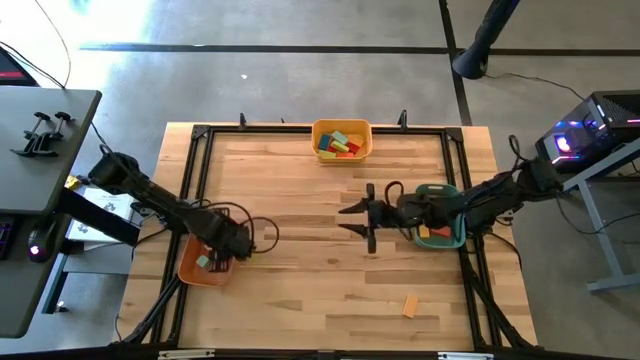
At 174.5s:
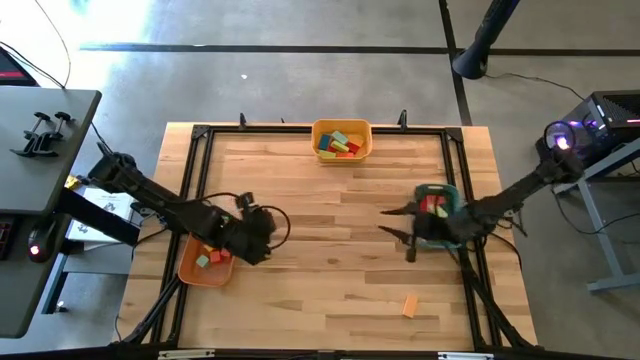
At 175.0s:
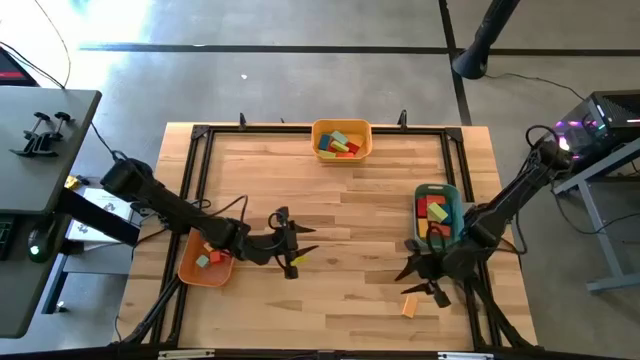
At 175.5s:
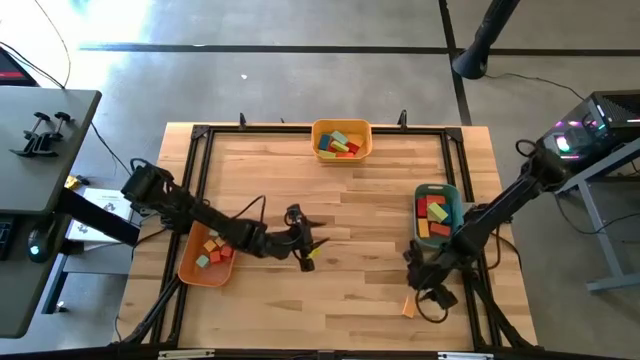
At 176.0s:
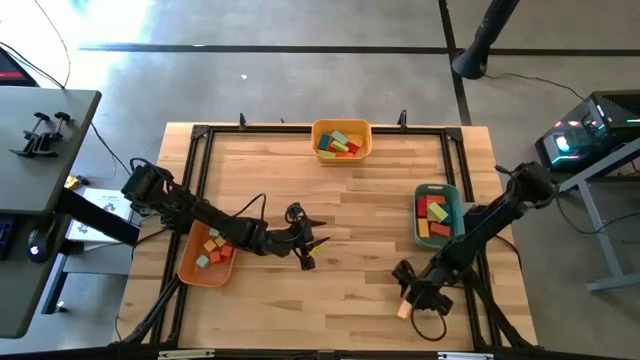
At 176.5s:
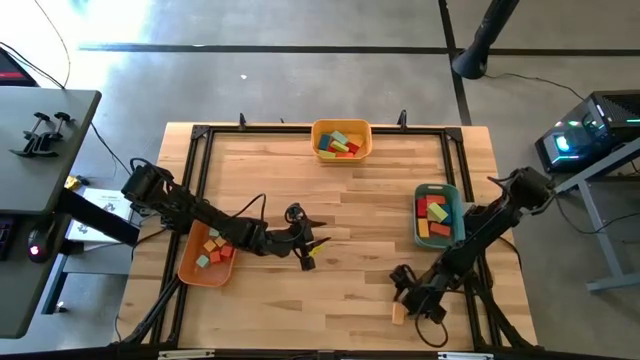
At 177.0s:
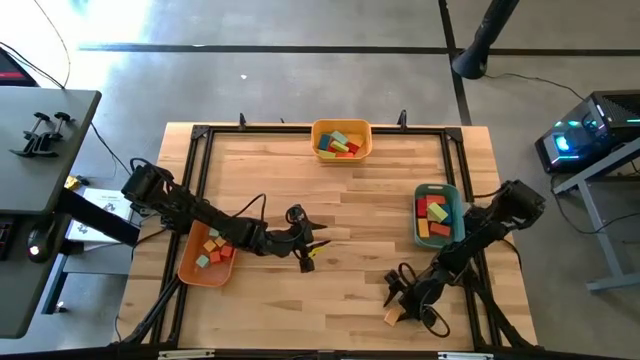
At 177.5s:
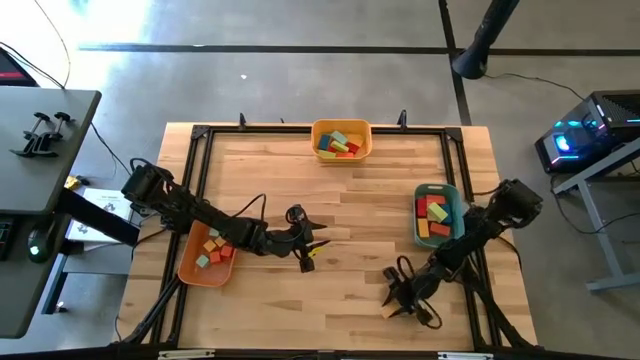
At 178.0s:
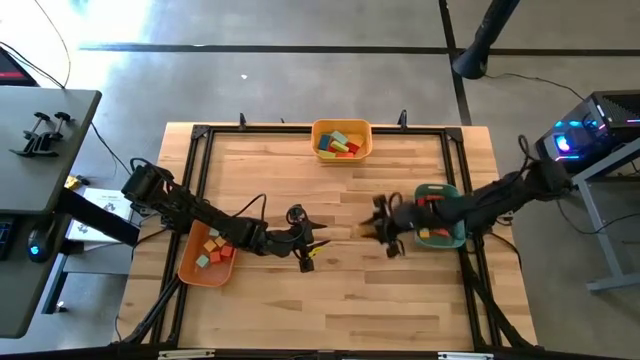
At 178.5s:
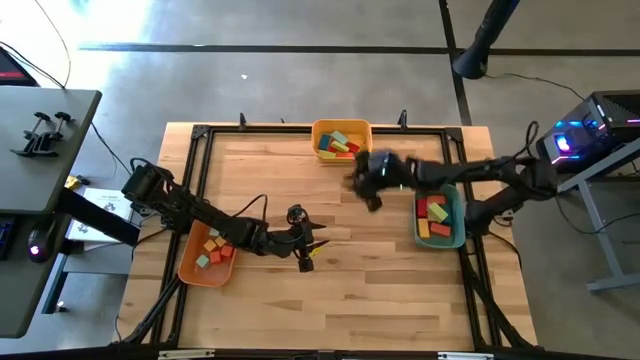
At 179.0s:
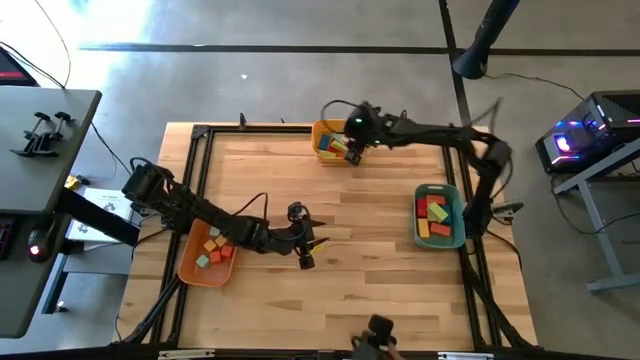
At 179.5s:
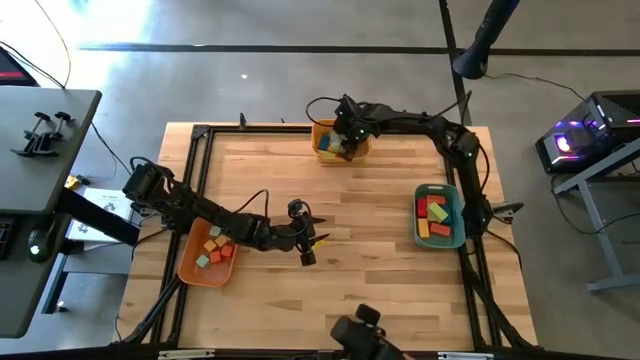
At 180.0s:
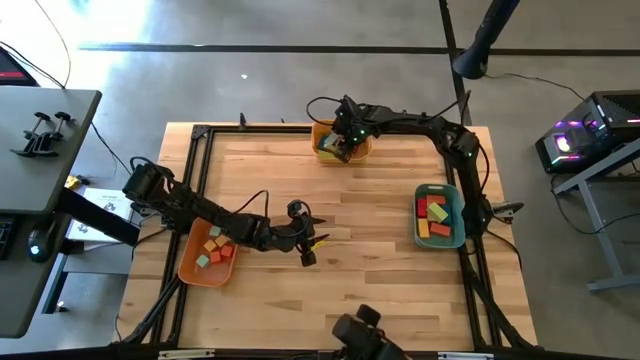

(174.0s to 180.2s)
Task: Sort blocks by size
Put the yellow thin rectangular block into the yellow bin

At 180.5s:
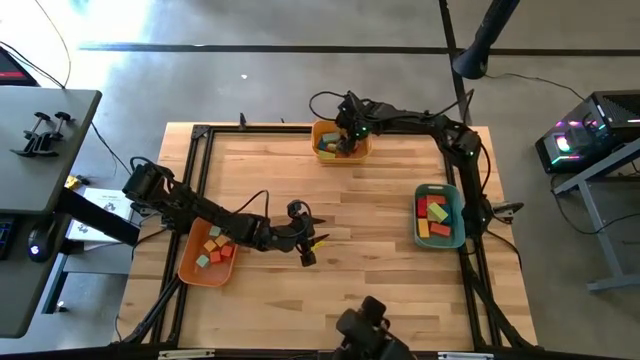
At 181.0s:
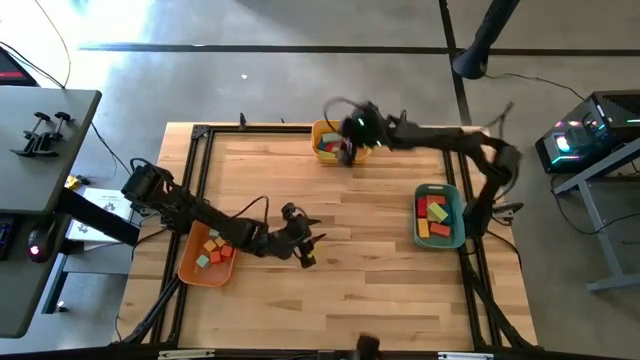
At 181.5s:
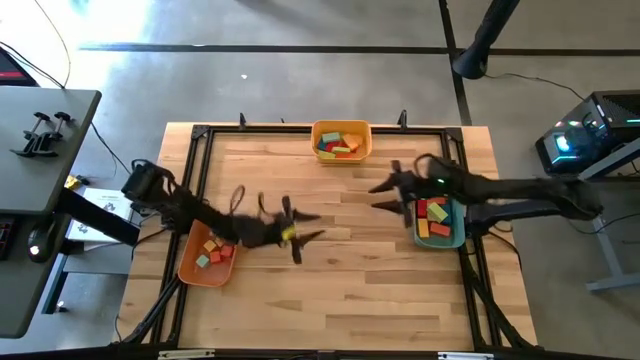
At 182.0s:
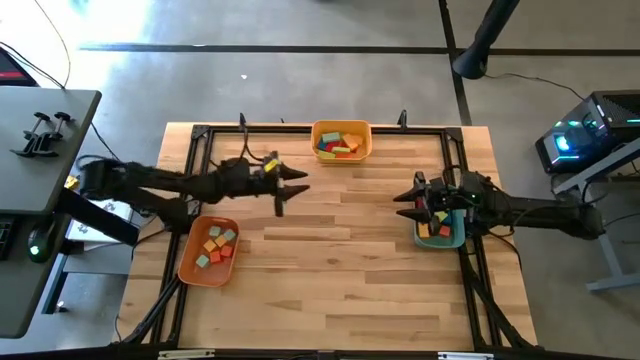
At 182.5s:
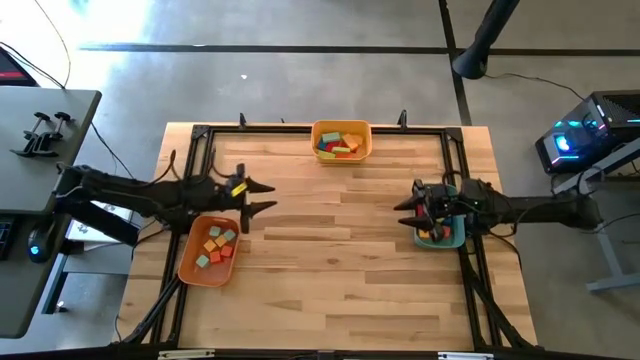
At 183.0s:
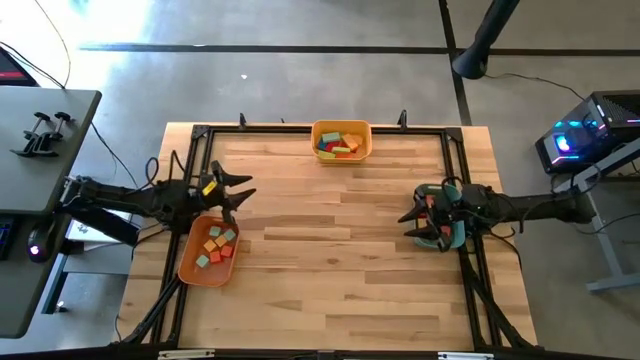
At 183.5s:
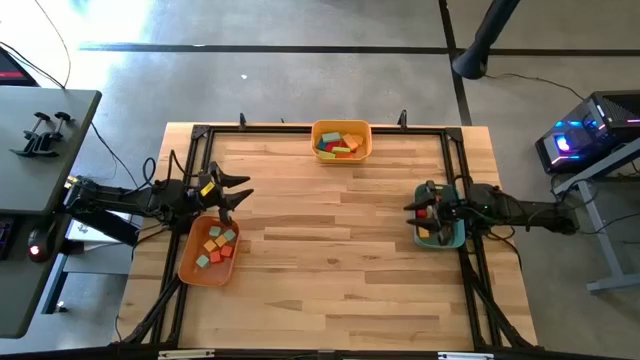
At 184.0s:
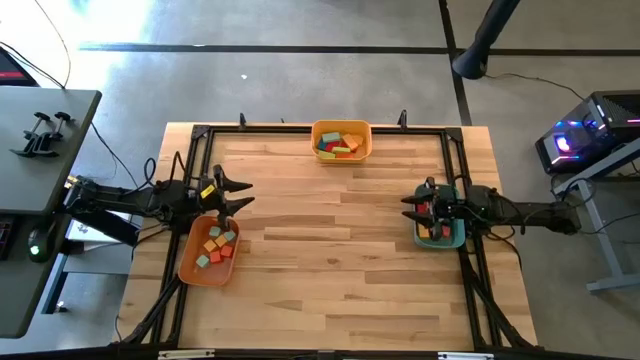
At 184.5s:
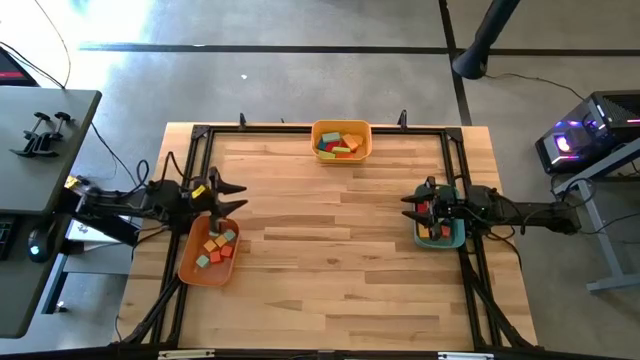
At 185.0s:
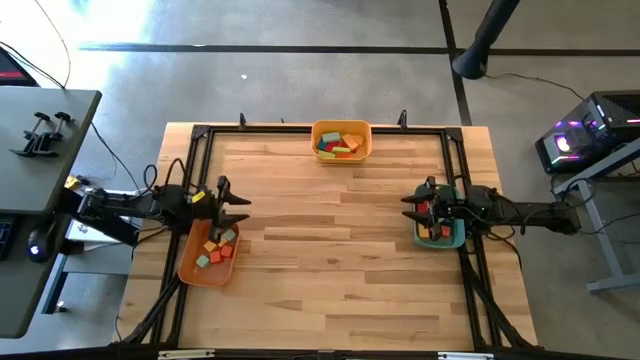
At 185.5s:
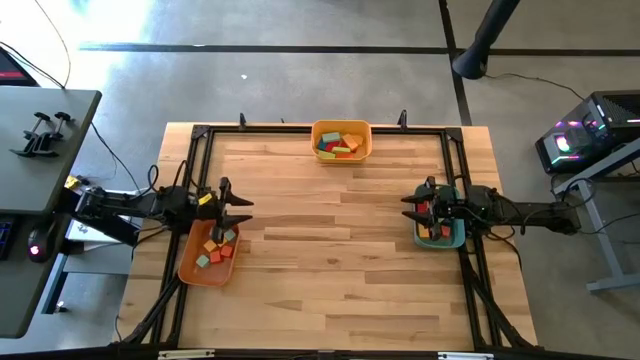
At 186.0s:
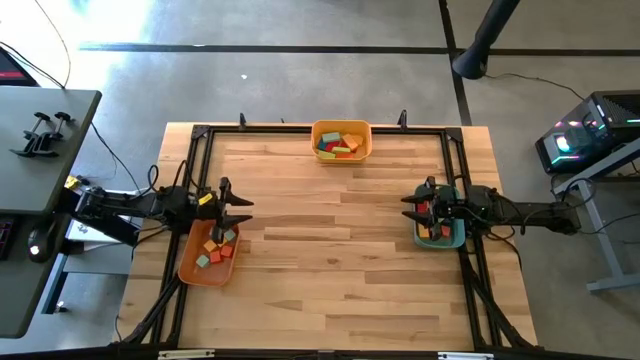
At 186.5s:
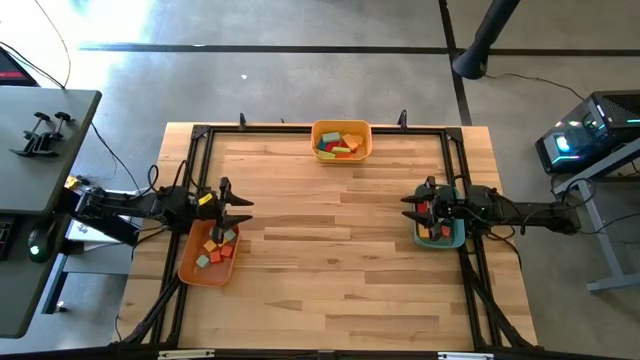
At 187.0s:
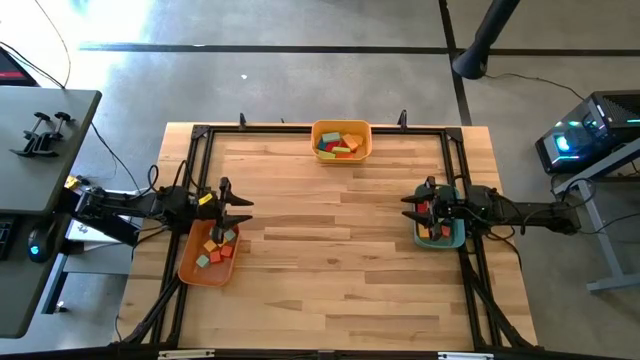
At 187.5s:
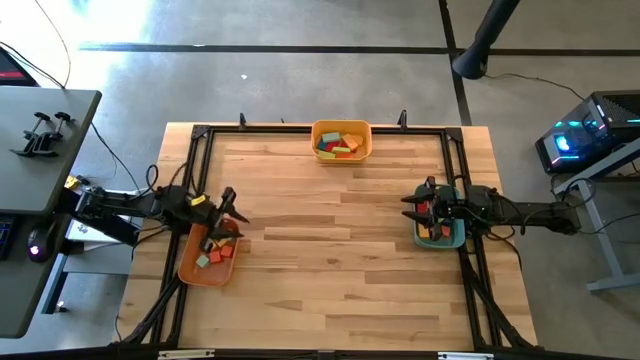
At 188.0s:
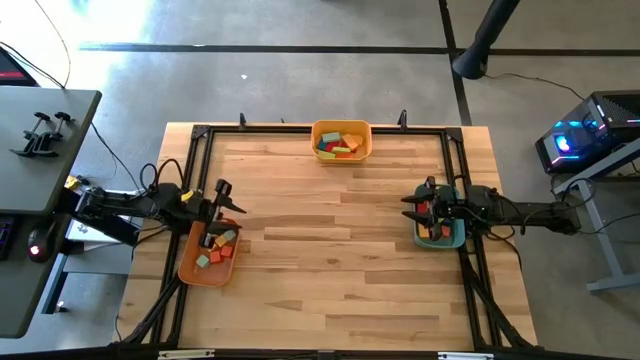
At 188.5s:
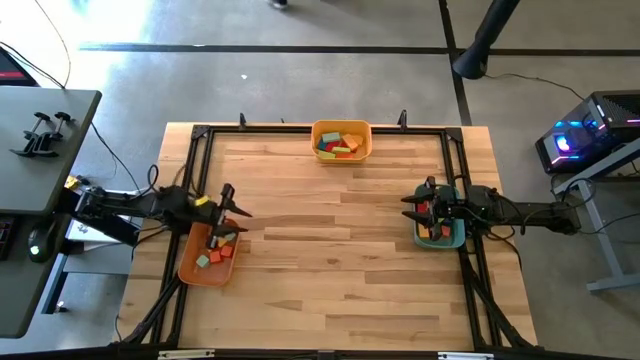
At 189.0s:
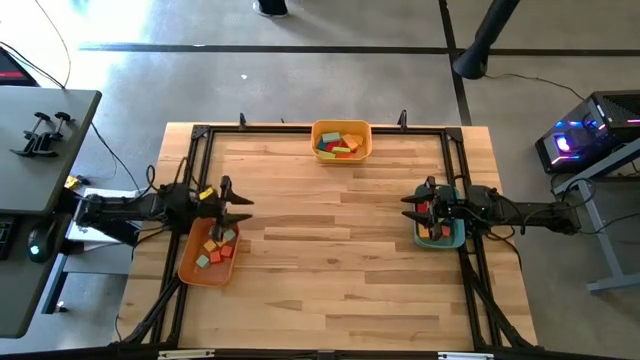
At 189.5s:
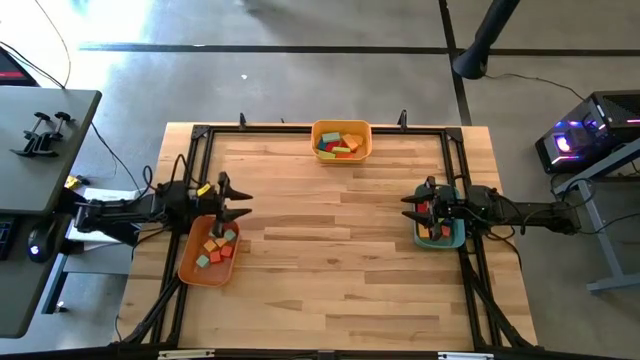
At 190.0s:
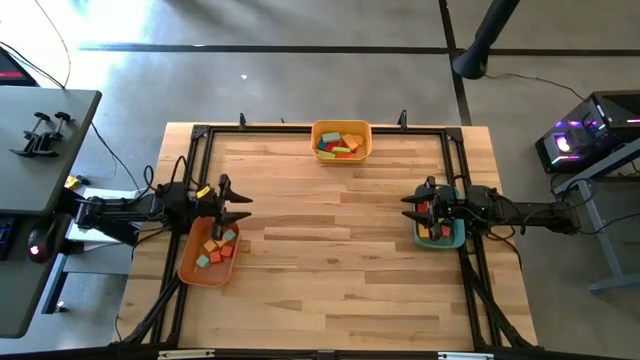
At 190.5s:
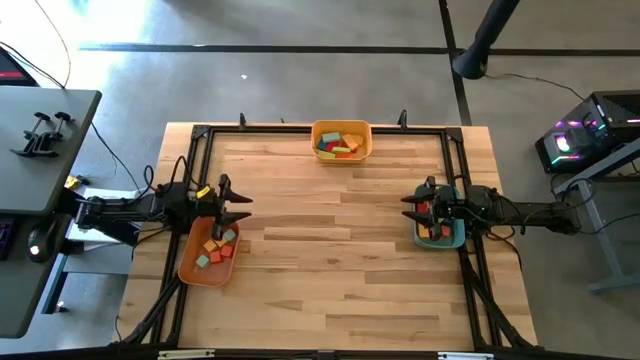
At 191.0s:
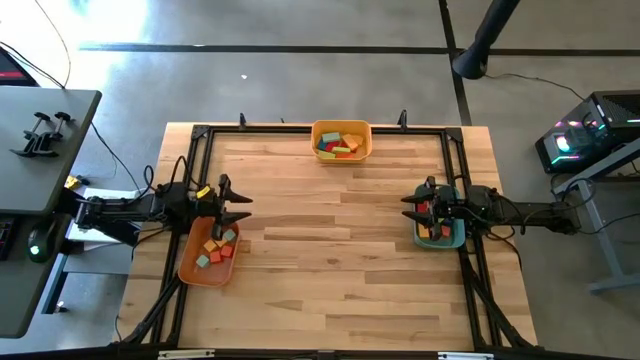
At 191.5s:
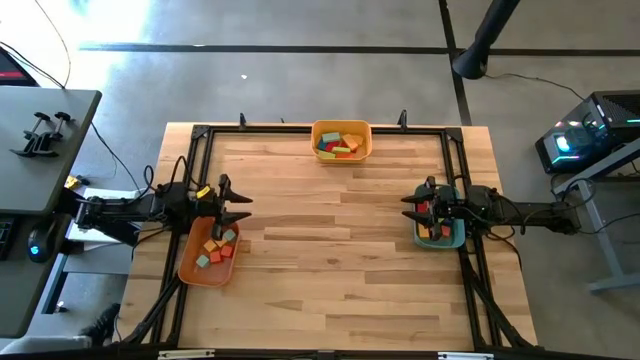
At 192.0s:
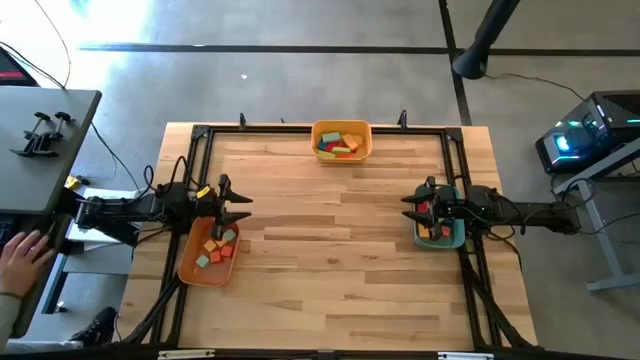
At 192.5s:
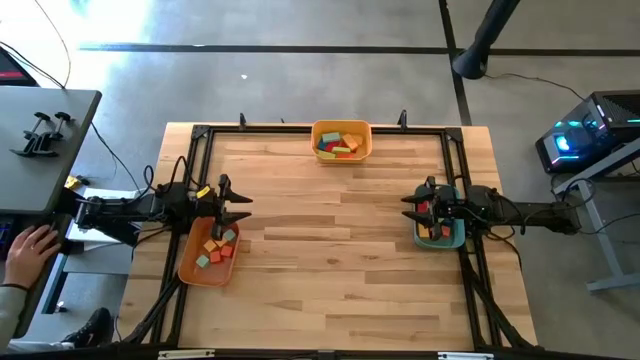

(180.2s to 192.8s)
Return to Home Position

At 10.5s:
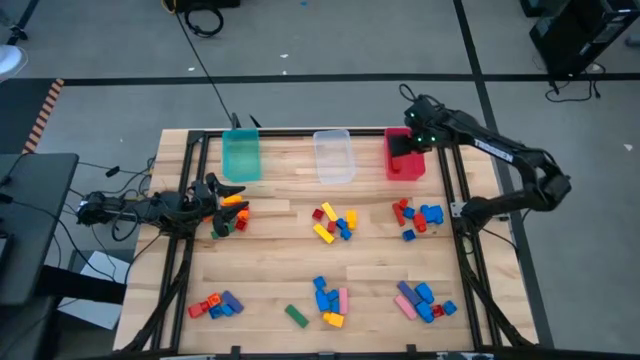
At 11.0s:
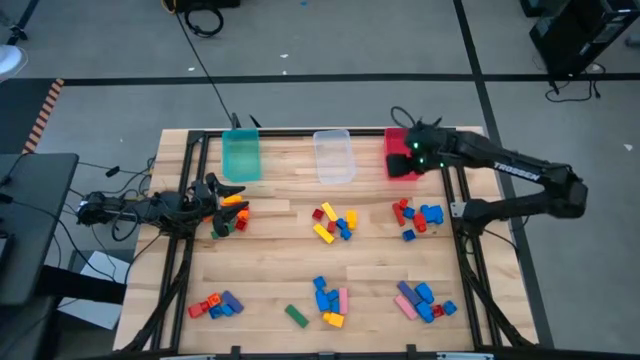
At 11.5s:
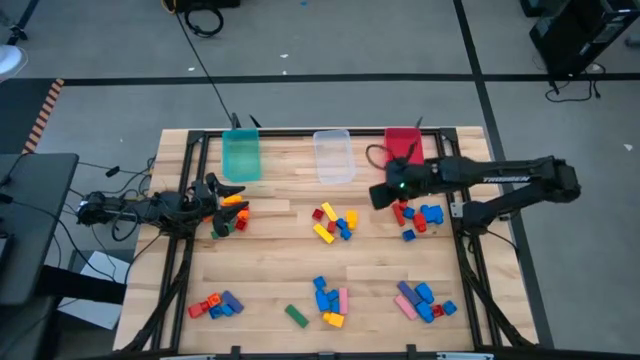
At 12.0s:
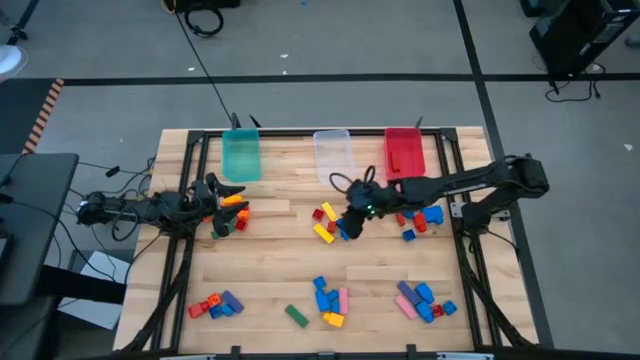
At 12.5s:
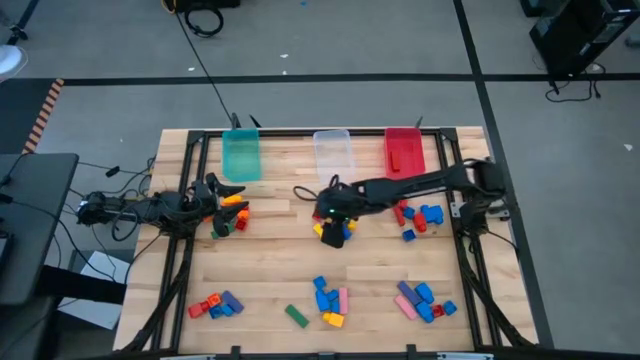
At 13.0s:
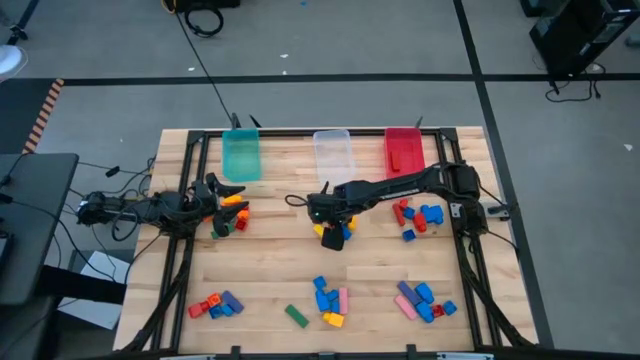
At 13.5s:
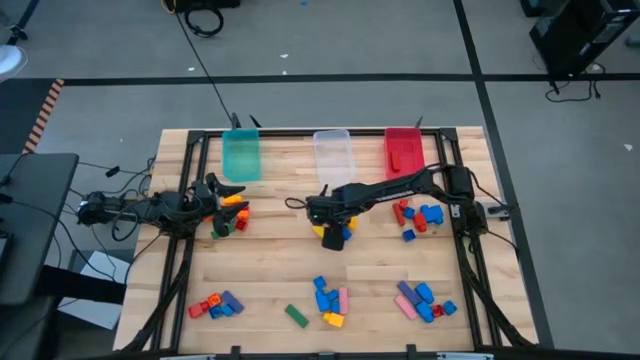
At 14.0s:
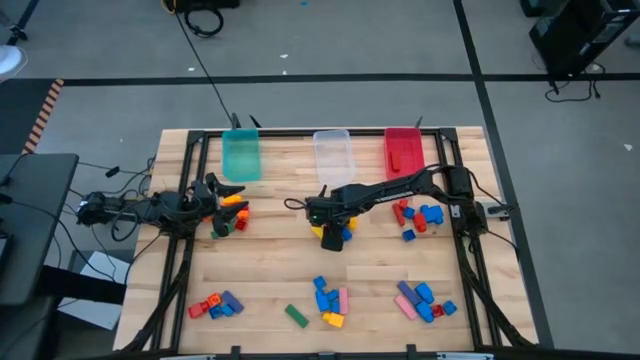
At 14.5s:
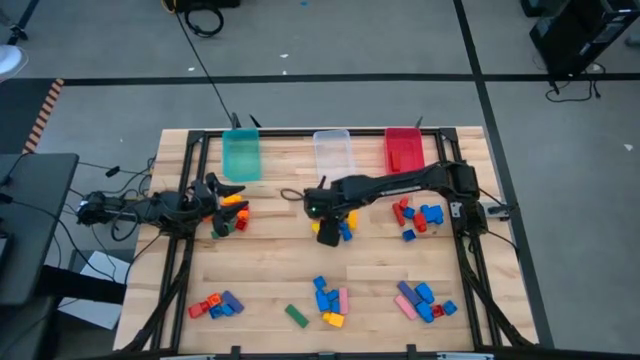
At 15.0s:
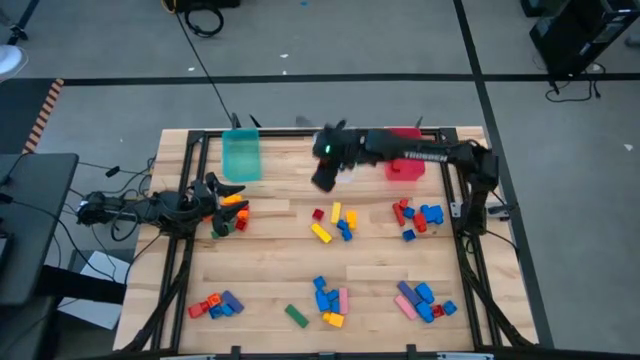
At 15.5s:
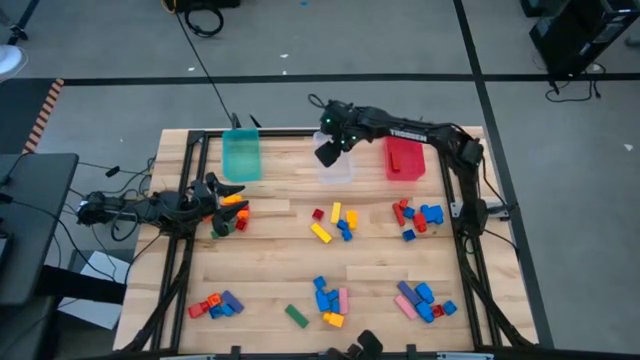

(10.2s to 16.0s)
Task: Sort blocks by size
Put the red 4 stud game piece into the transparent bin
